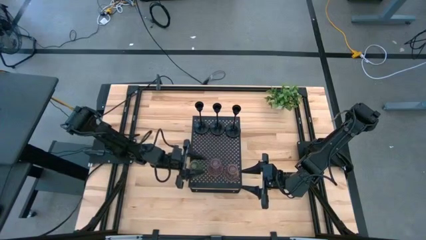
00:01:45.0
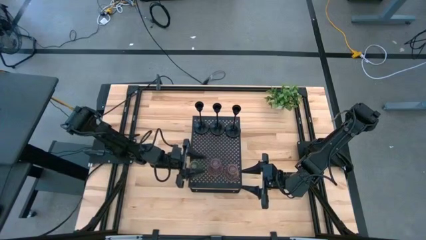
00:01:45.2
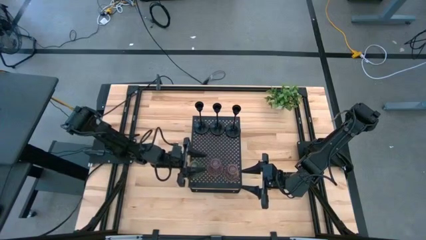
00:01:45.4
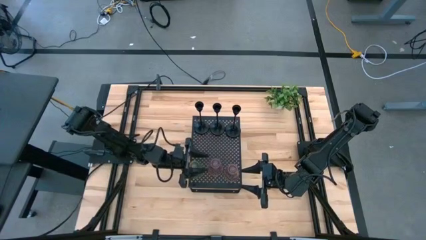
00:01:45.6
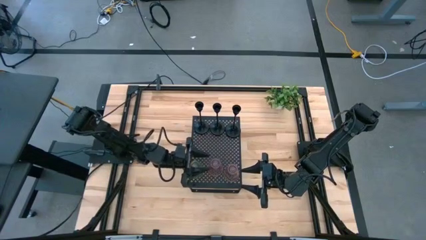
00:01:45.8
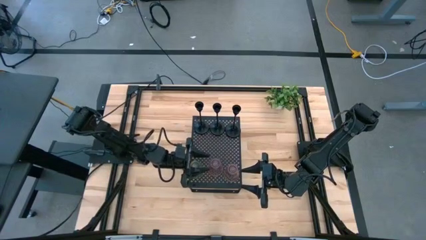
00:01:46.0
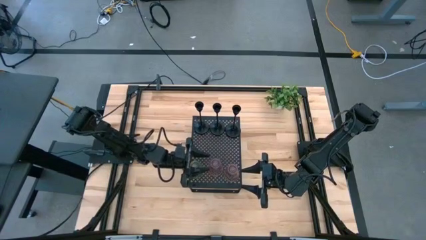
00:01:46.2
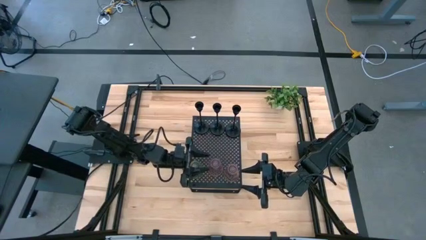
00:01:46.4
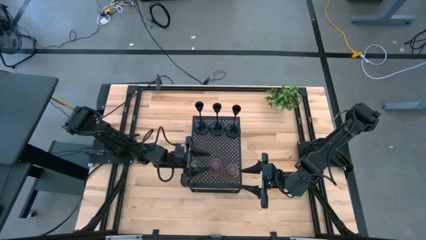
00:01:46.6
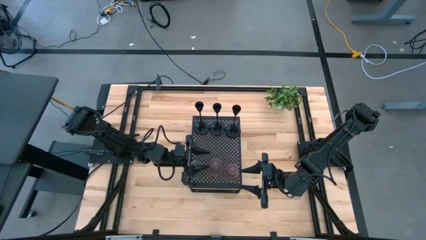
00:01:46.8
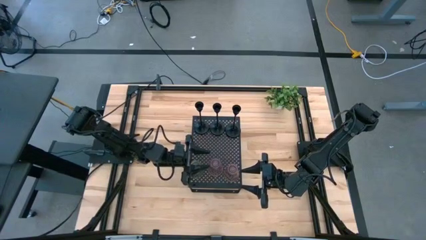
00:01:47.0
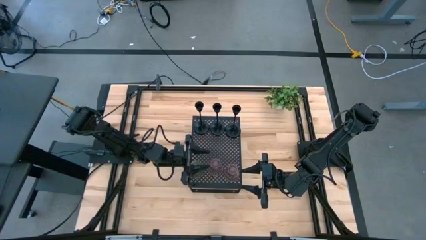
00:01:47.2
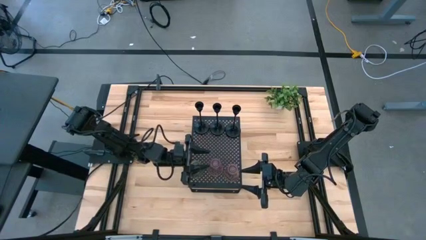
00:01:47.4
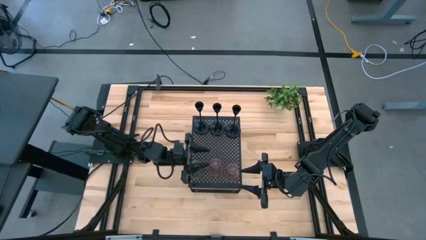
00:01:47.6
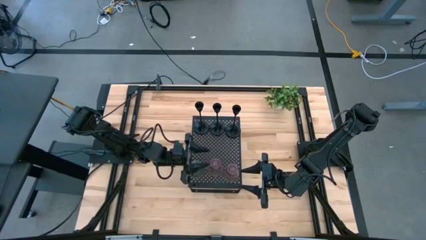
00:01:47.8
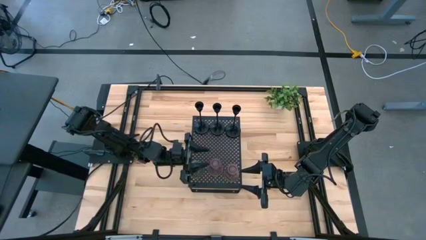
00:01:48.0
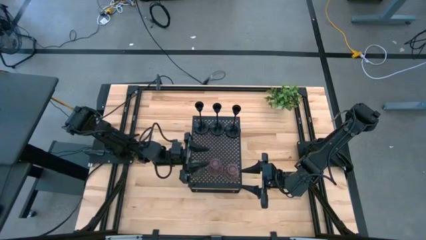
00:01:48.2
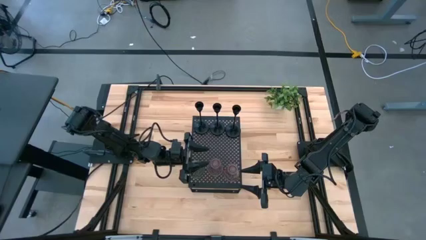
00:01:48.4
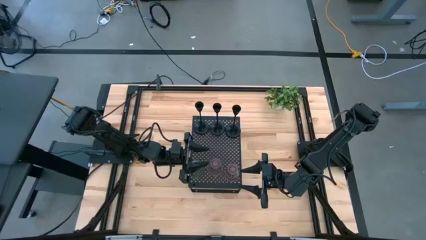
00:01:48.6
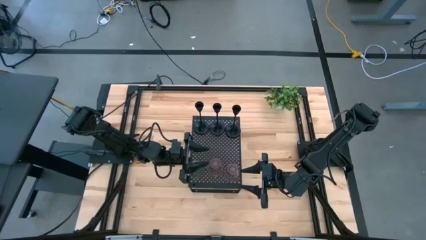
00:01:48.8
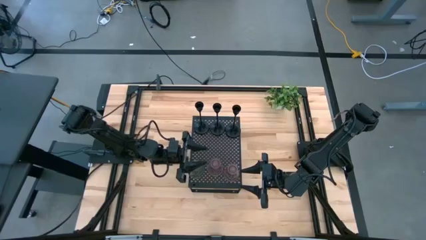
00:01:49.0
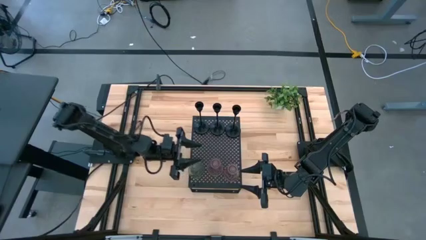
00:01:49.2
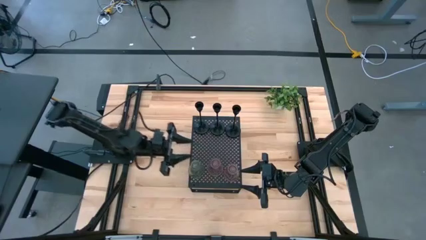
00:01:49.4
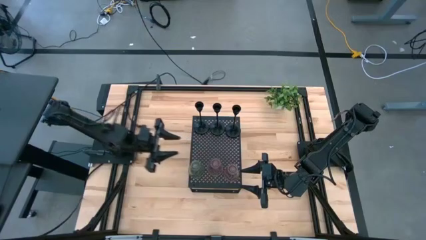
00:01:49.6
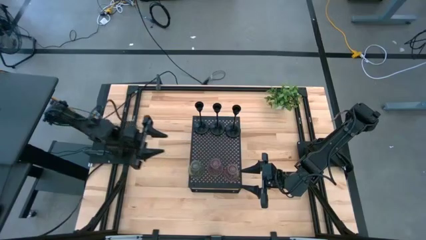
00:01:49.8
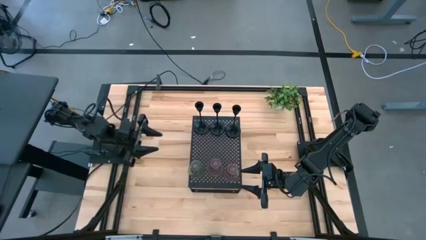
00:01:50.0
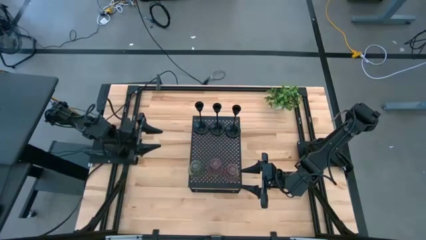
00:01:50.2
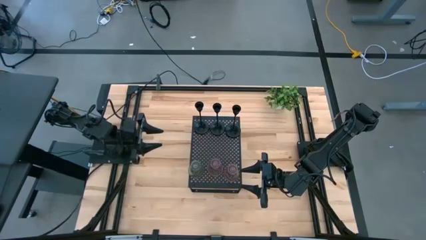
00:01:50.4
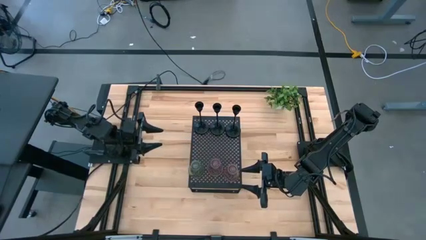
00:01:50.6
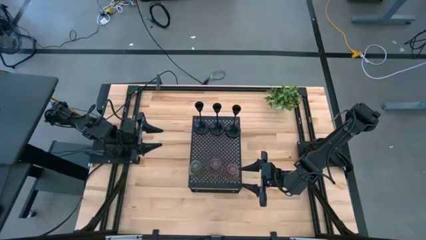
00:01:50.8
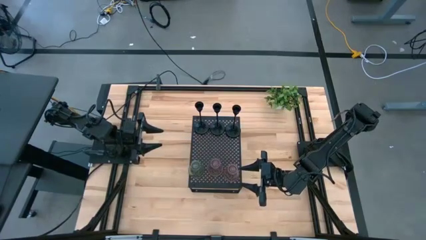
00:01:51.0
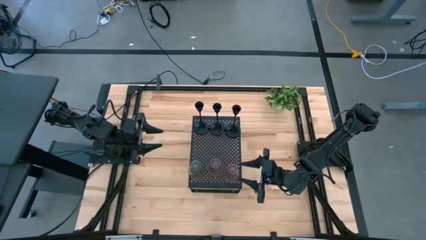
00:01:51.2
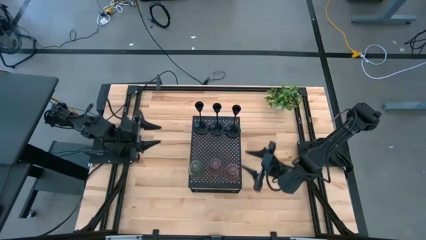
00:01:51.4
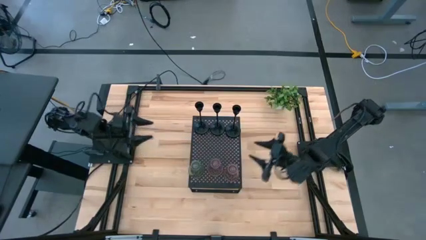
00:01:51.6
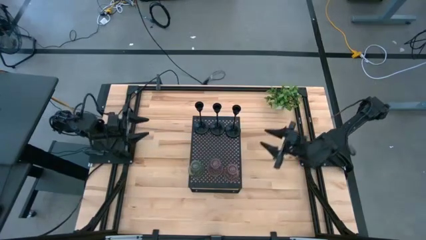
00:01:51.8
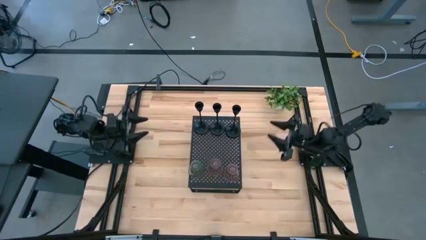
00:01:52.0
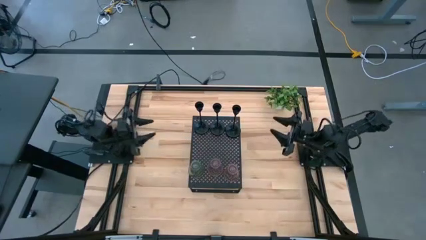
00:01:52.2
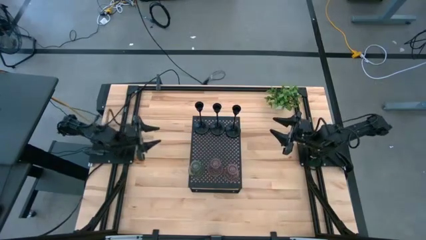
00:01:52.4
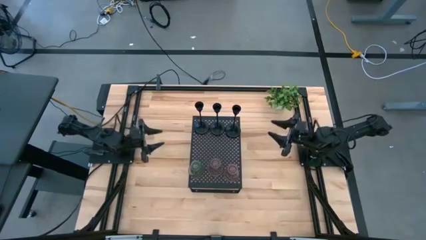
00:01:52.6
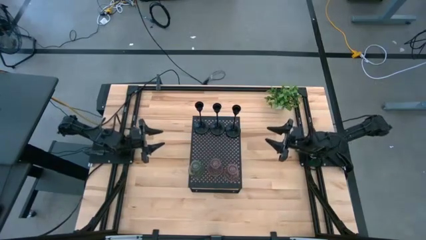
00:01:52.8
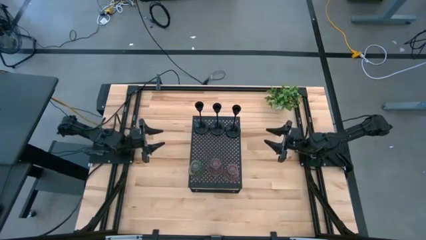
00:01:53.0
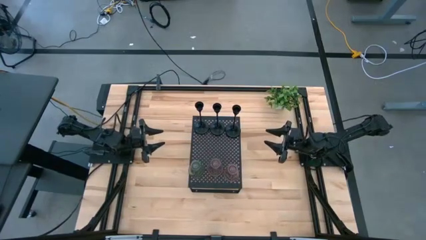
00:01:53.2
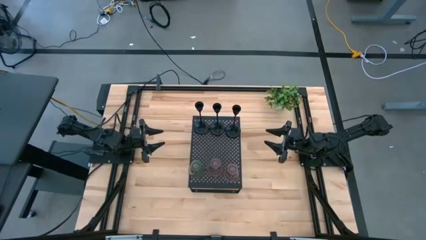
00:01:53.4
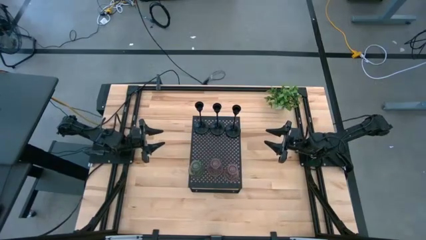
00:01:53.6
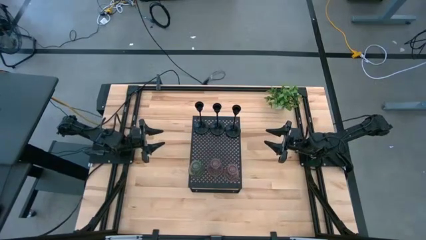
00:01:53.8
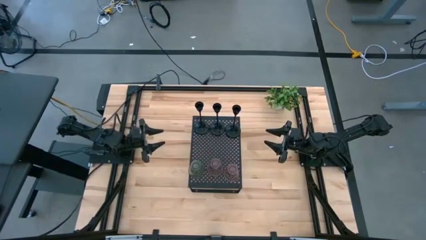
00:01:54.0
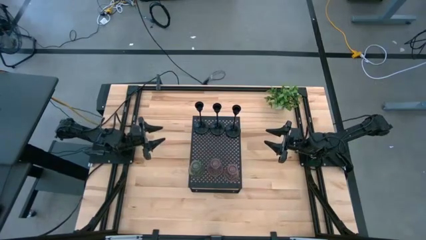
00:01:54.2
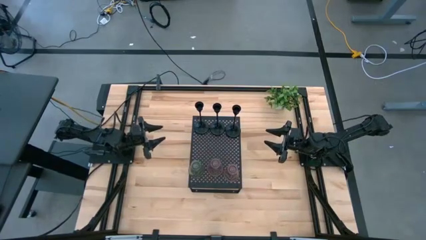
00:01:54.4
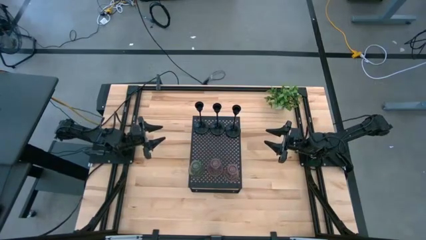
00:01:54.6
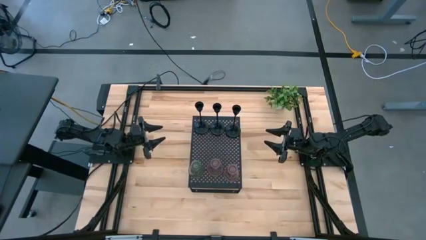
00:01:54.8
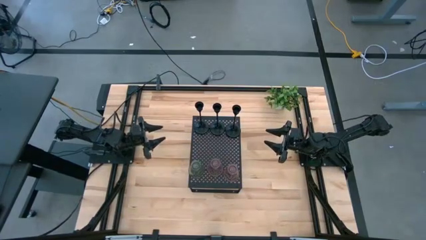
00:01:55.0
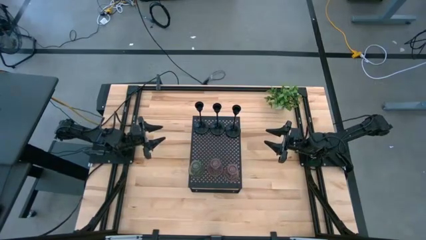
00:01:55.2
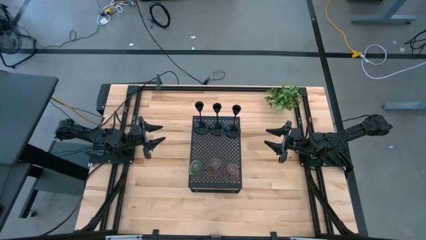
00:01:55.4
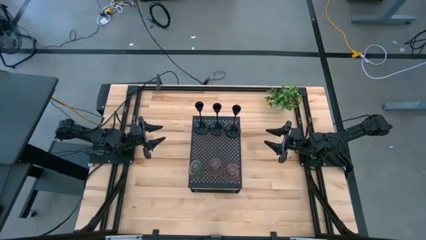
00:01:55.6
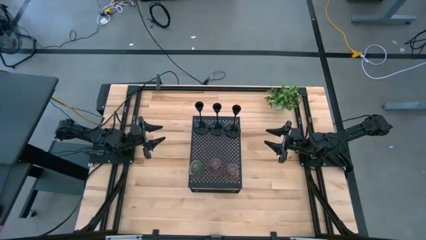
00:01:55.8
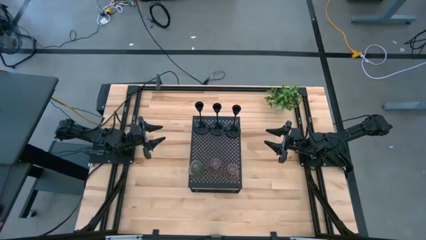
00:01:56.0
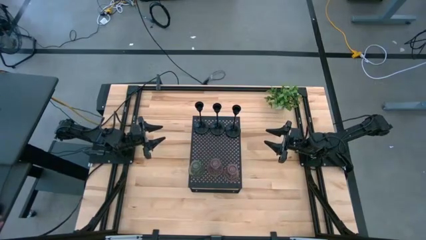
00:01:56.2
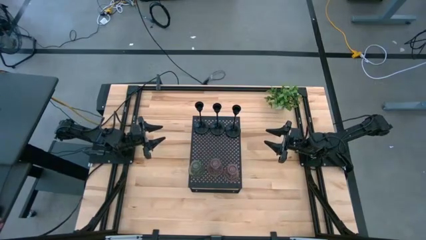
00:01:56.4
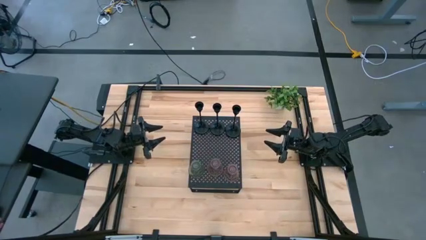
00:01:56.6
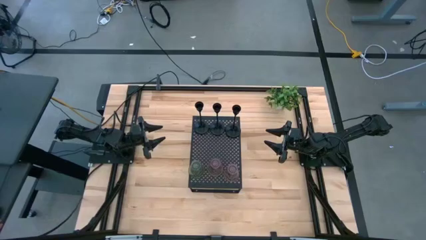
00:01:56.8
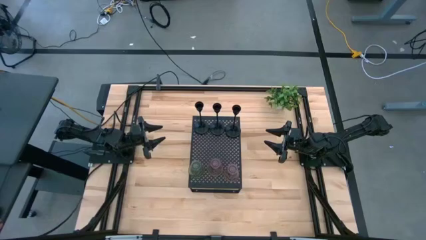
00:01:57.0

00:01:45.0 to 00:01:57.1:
Task: Pick & Place candle stick holders
Return to Home Position

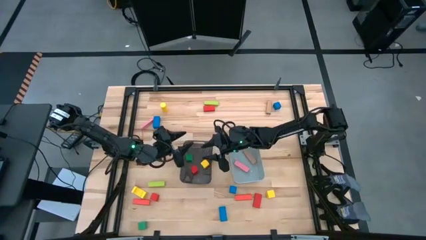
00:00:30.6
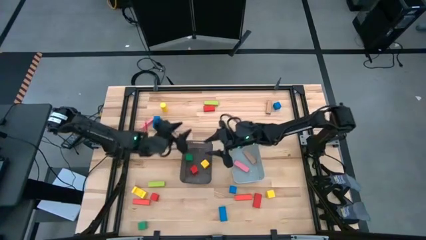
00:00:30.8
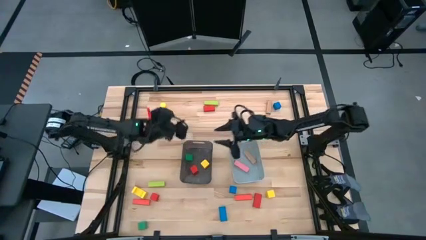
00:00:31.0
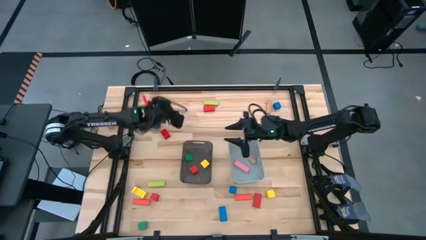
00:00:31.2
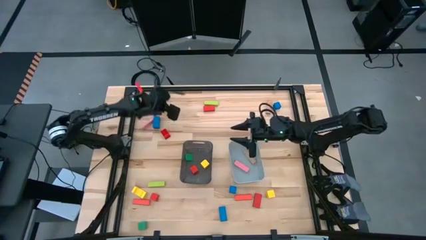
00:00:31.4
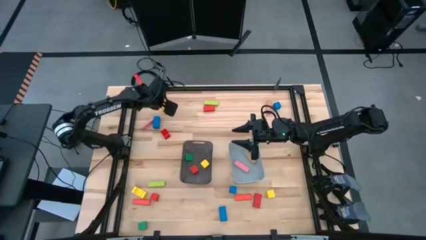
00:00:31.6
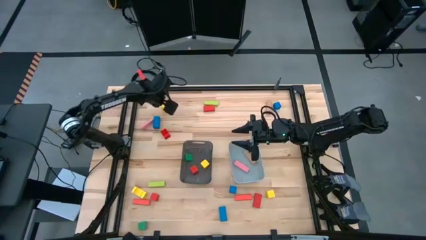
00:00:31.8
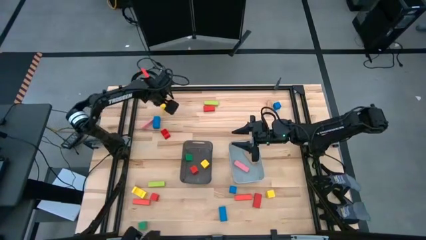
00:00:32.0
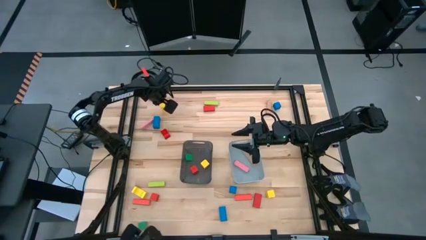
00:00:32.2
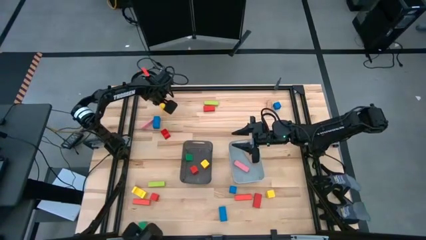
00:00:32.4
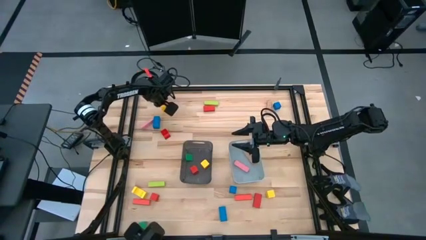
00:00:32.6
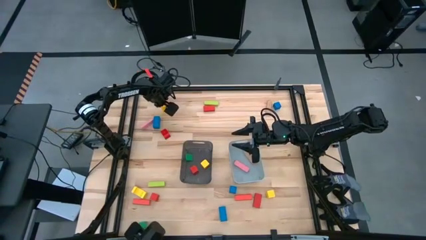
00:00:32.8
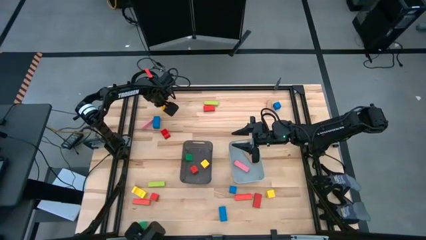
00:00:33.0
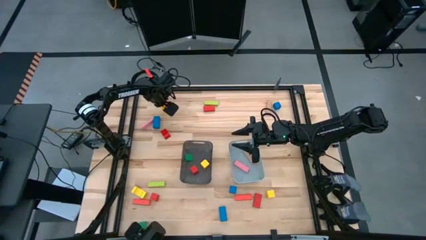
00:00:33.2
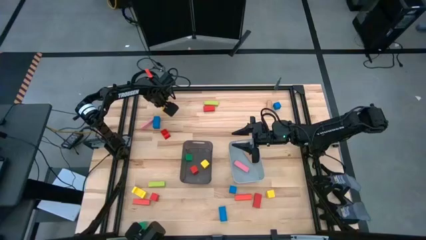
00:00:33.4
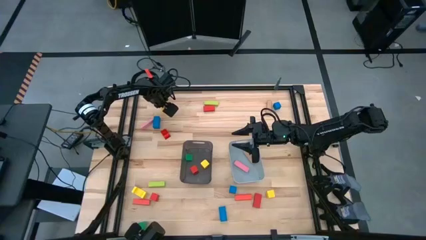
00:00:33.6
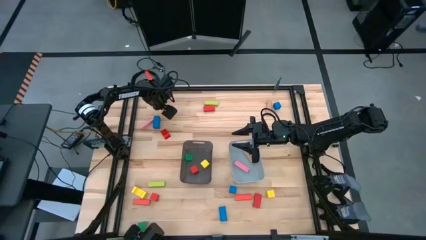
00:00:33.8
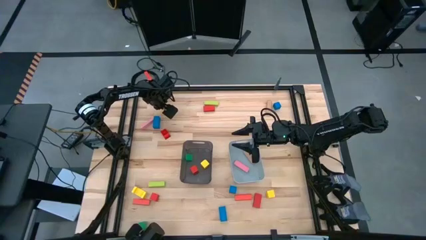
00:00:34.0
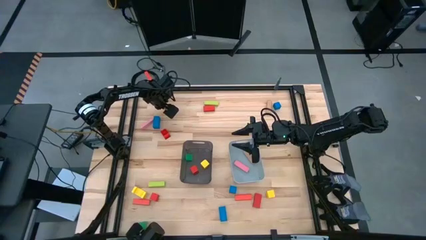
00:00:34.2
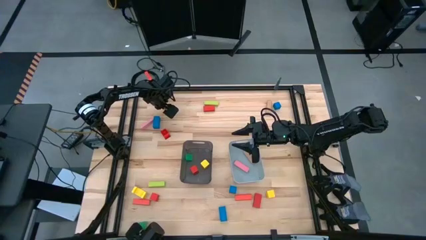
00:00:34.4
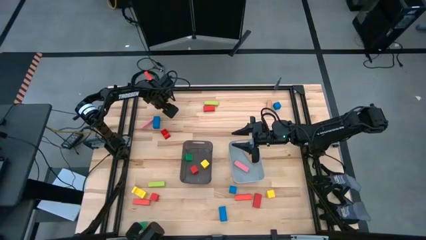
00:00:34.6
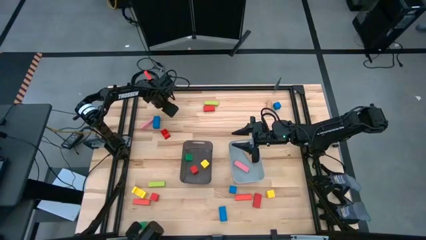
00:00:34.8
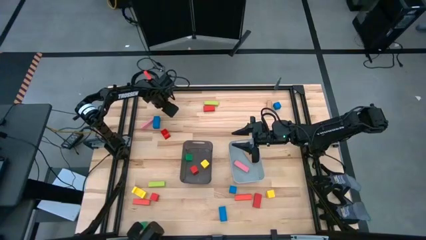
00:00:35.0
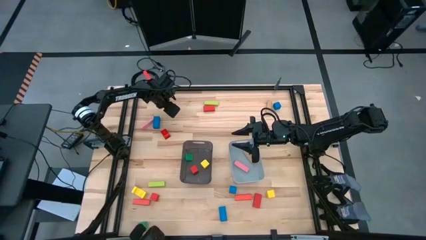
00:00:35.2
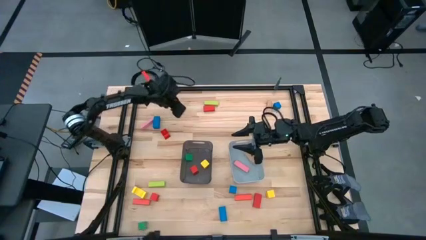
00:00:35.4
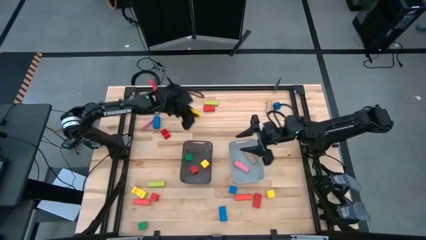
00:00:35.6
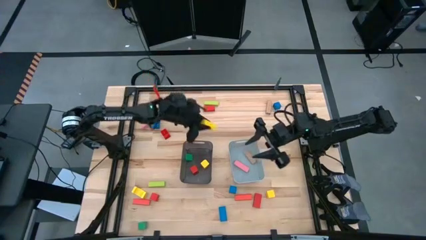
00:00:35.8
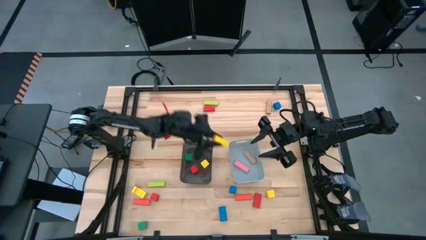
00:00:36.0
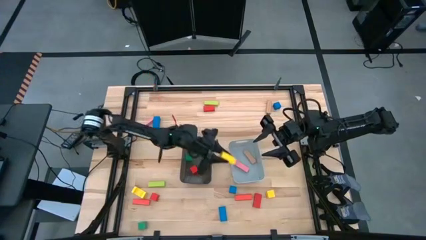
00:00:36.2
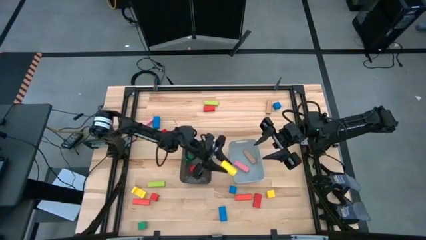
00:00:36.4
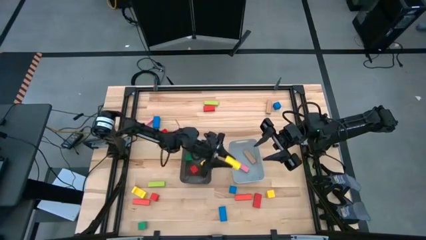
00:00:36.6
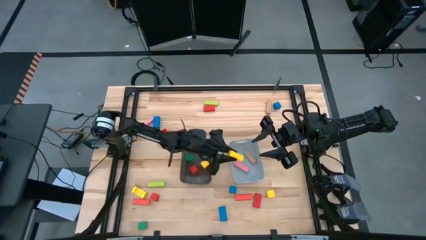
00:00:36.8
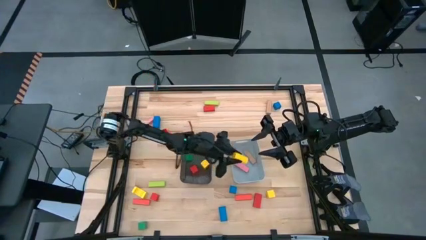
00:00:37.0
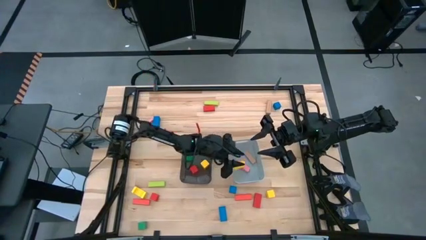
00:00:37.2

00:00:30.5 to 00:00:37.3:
Task: Sort blocks by size
Put the top large yellow block into the gray bin
